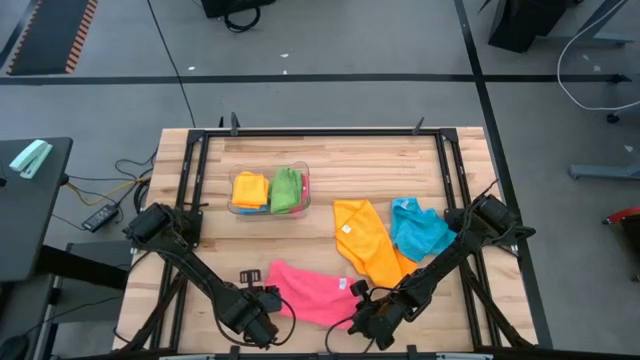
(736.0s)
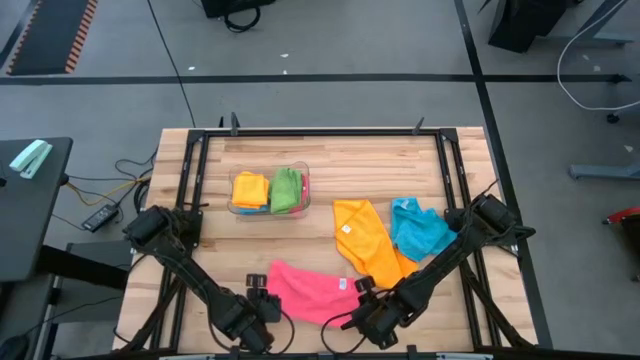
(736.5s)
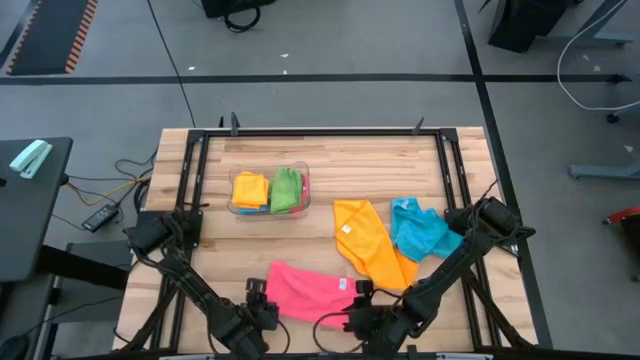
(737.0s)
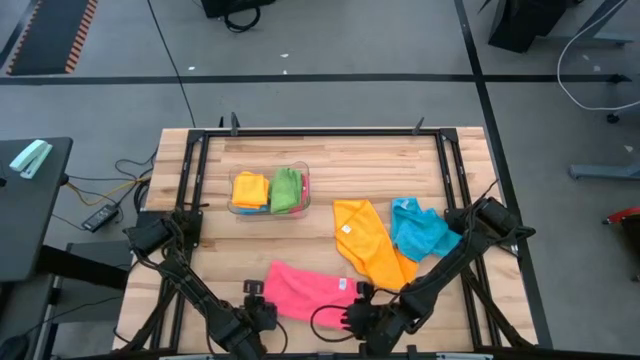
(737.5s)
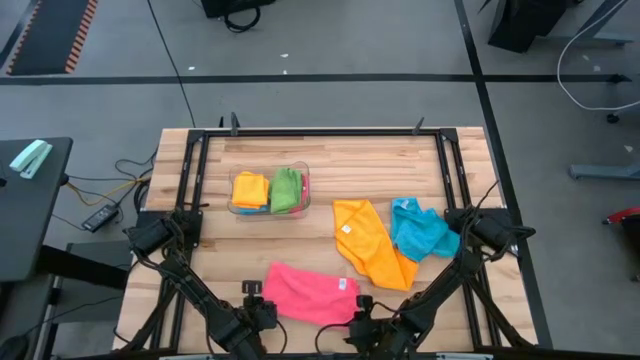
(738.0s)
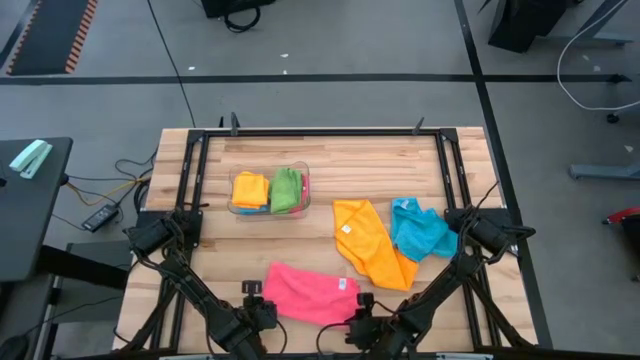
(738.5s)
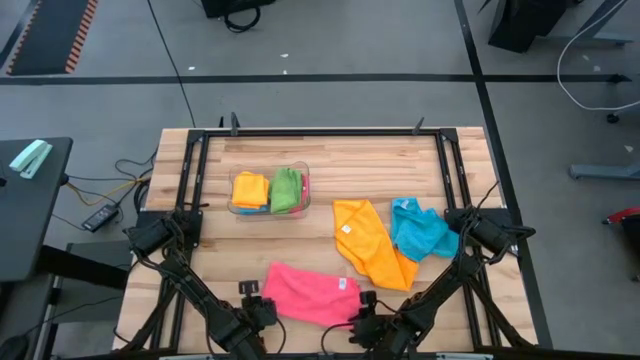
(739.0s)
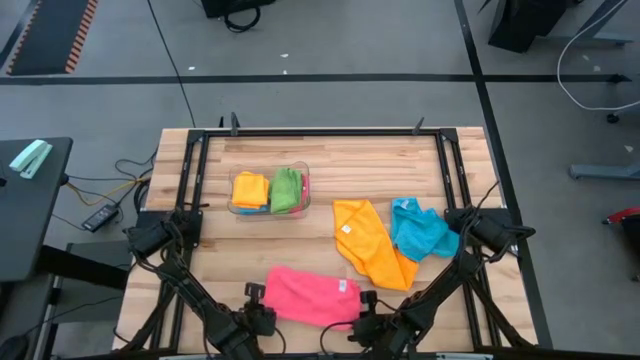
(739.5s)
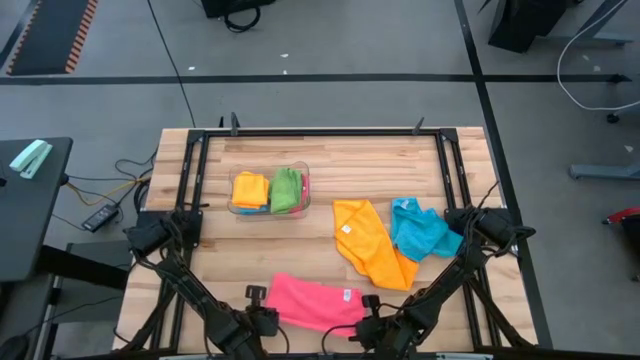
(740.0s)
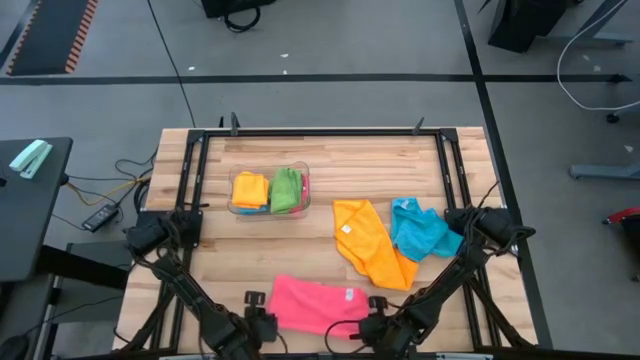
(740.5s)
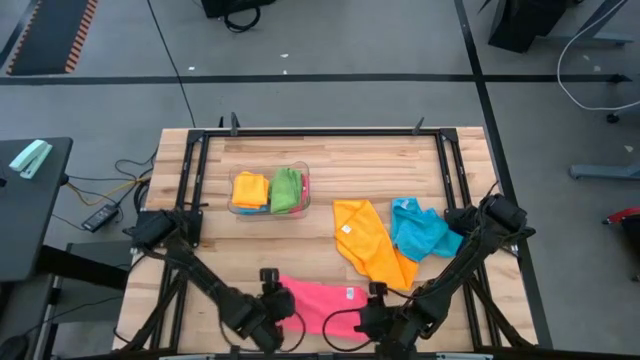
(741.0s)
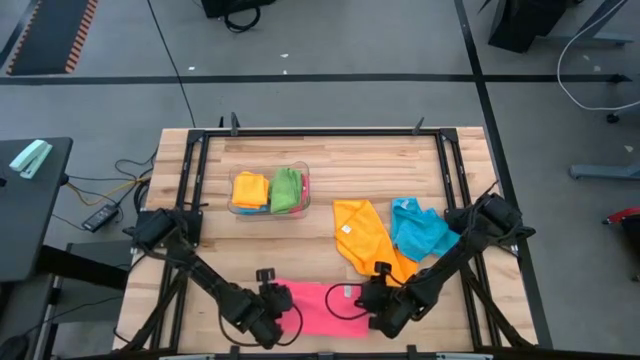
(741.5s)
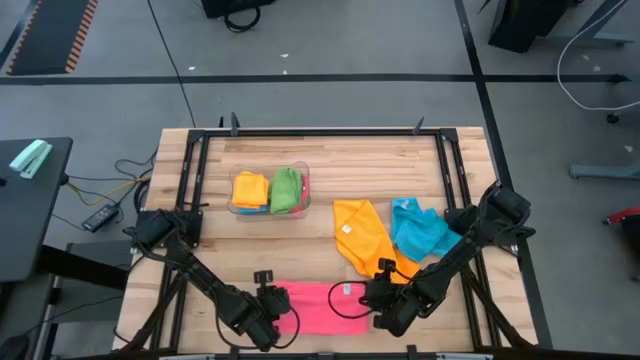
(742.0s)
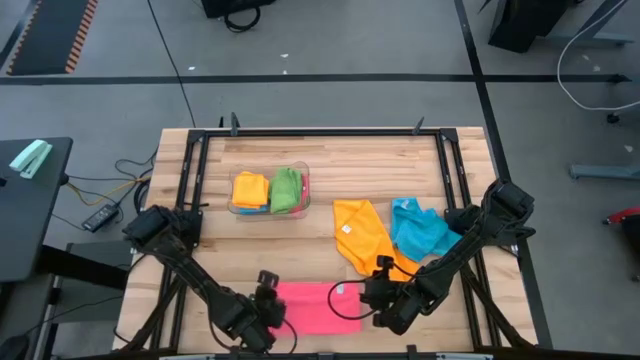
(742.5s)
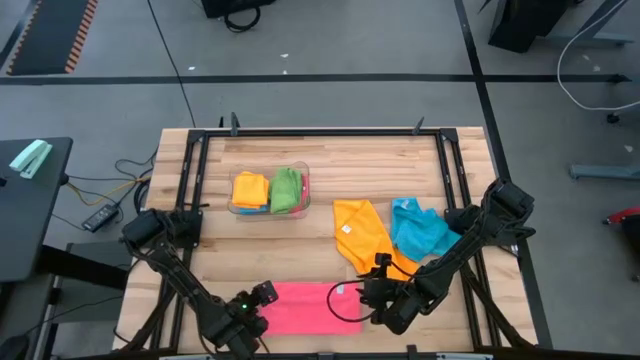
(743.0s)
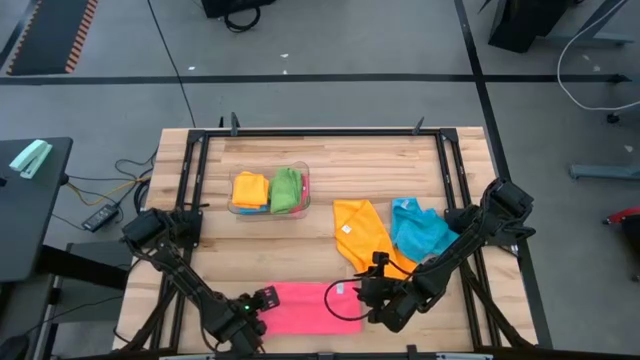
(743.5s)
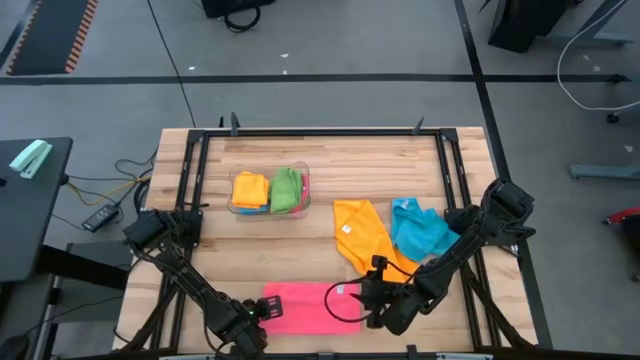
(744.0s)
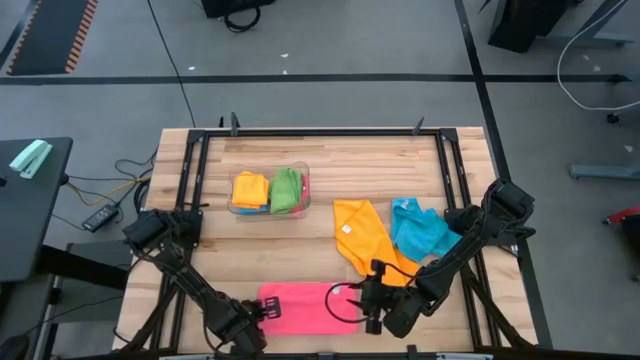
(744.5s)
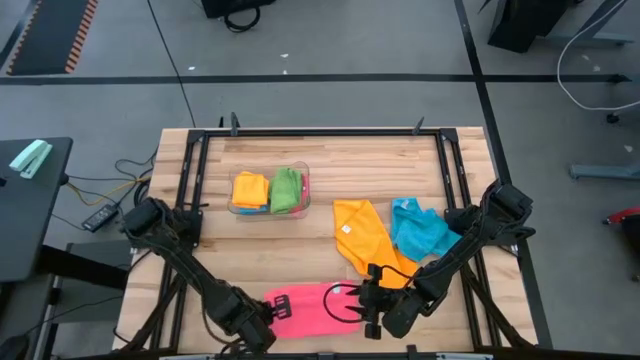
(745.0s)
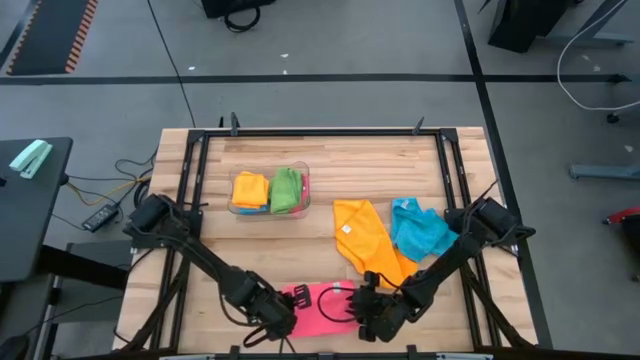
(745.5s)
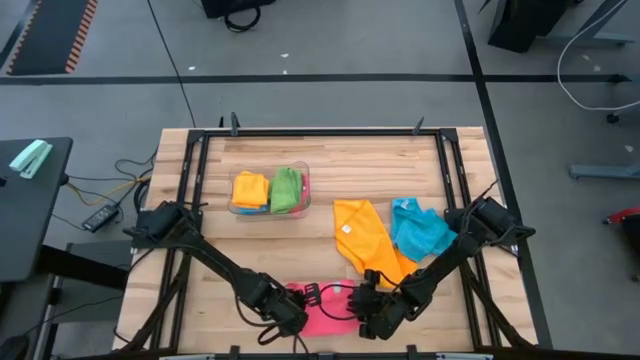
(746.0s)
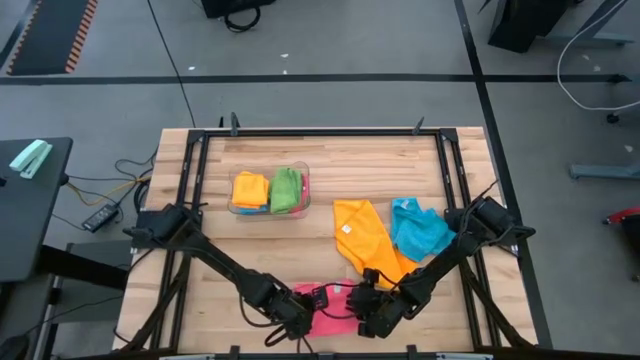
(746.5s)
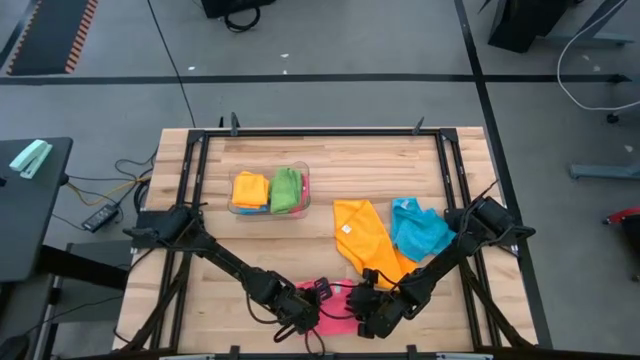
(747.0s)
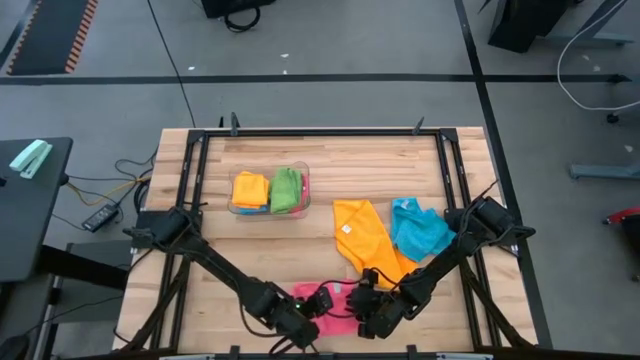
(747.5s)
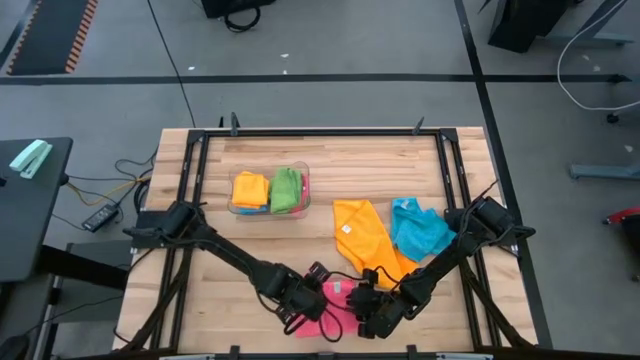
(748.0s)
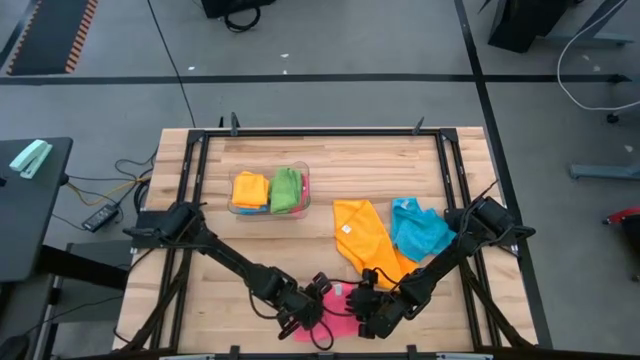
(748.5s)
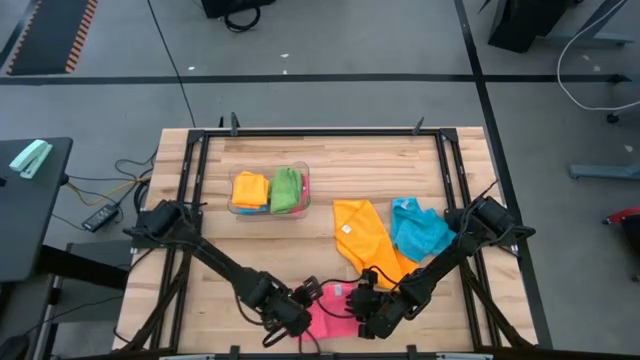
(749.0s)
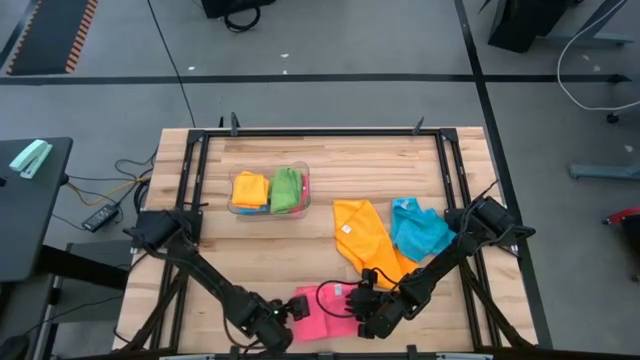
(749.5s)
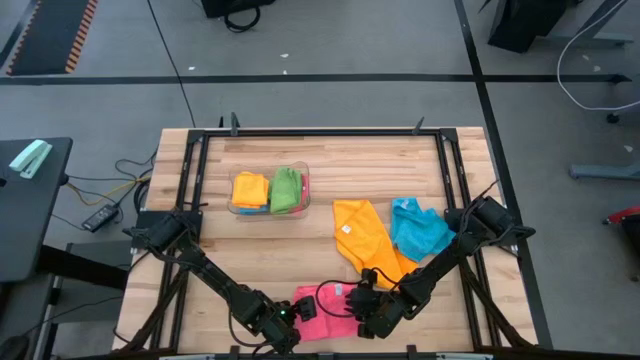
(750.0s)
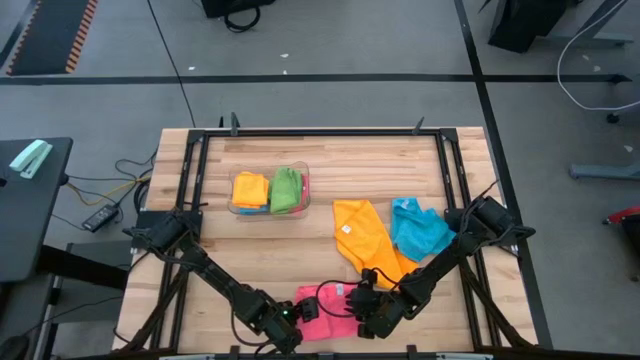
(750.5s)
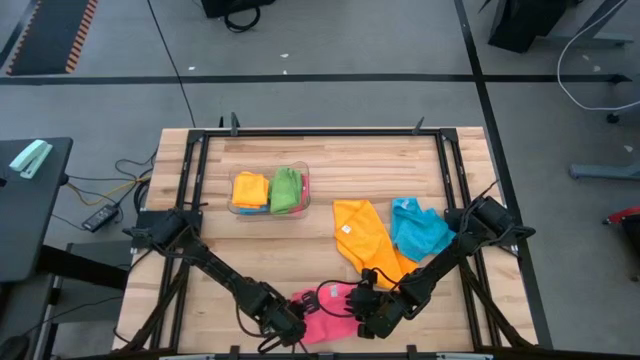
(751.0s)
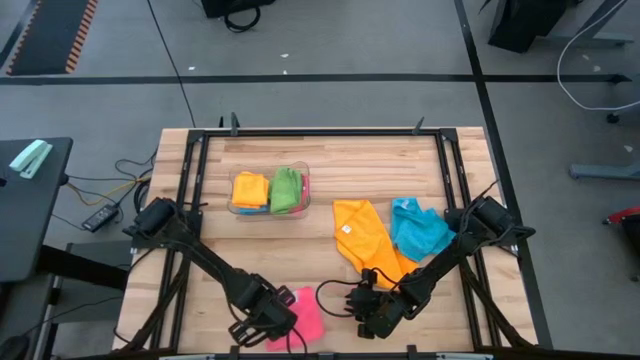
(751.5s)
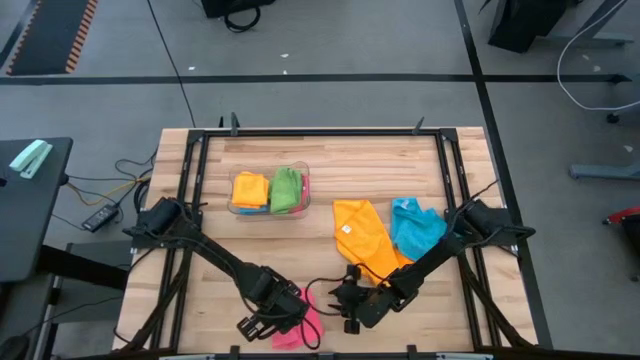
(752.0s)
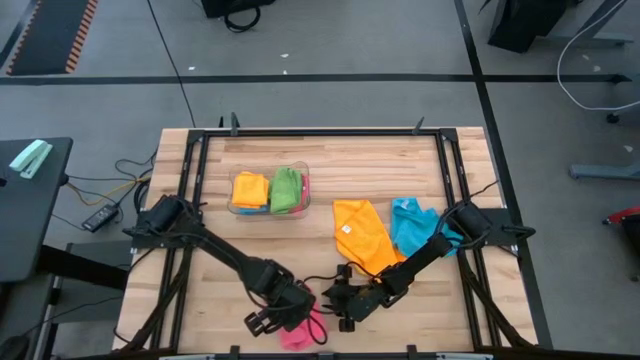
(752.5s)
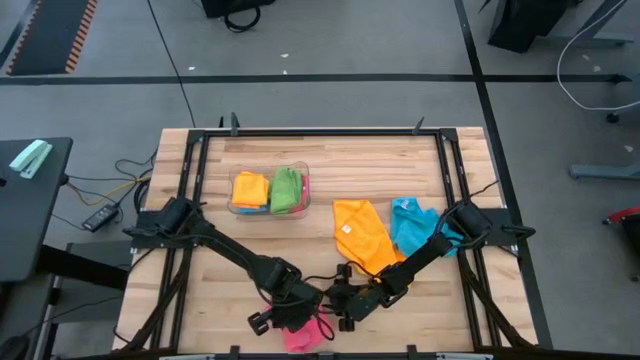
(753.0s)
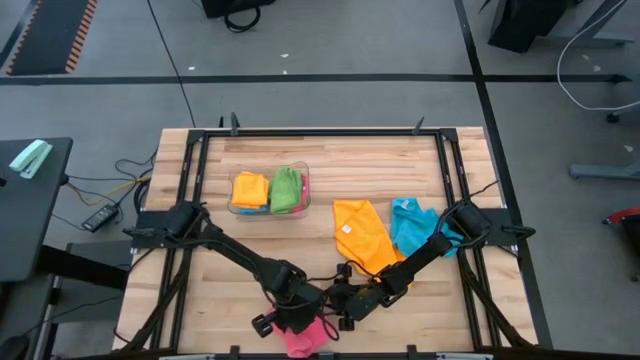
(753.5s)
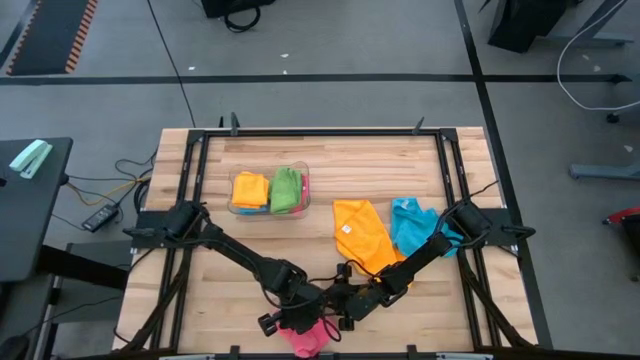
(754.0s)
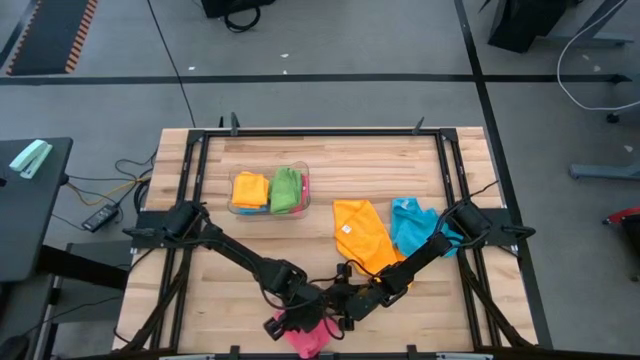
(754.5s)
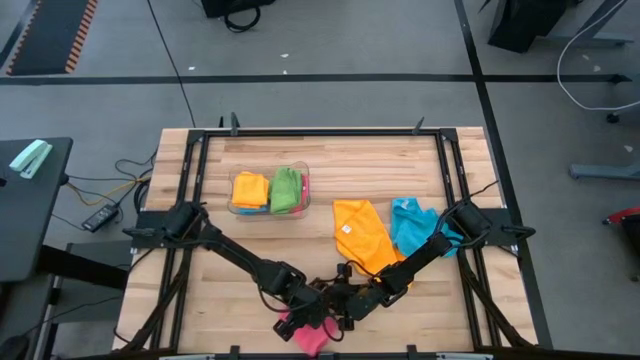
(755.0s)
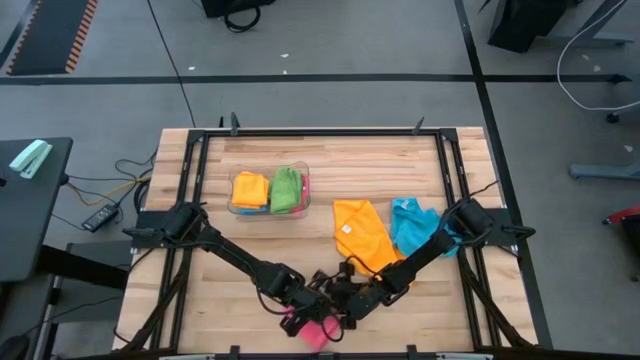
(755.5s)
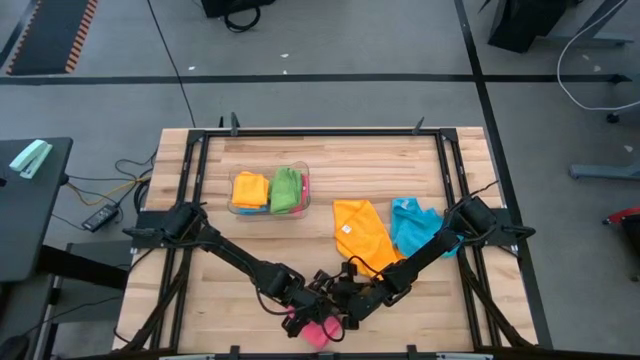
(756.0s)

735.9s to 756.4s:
Task: Fold microfiber towels
Fold the pink microfiber towel
